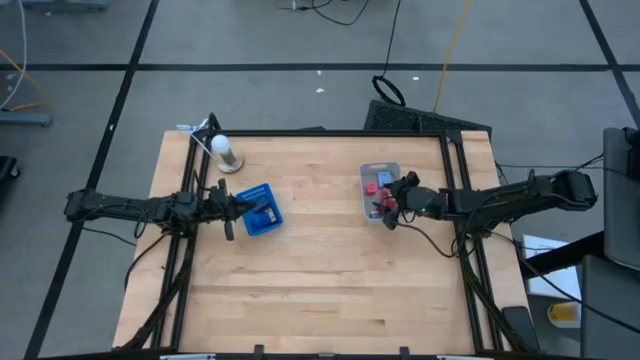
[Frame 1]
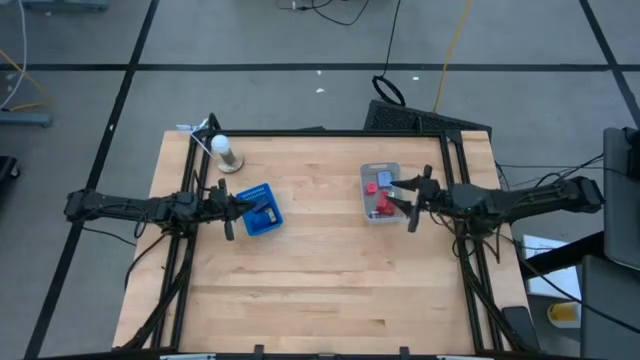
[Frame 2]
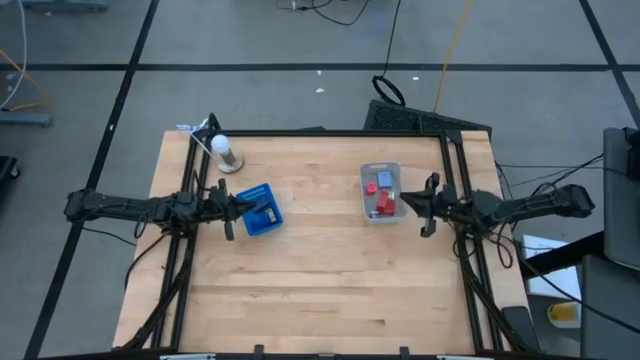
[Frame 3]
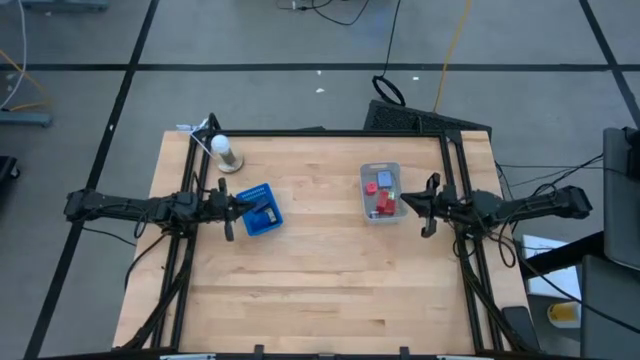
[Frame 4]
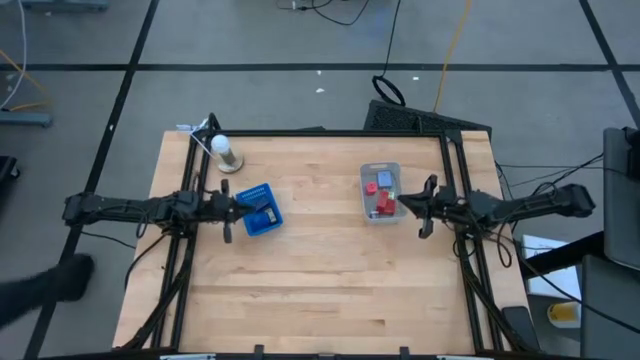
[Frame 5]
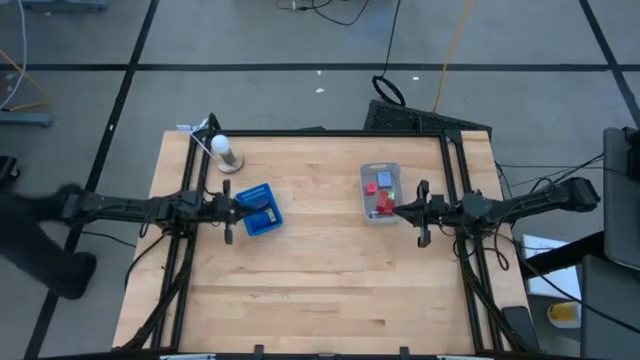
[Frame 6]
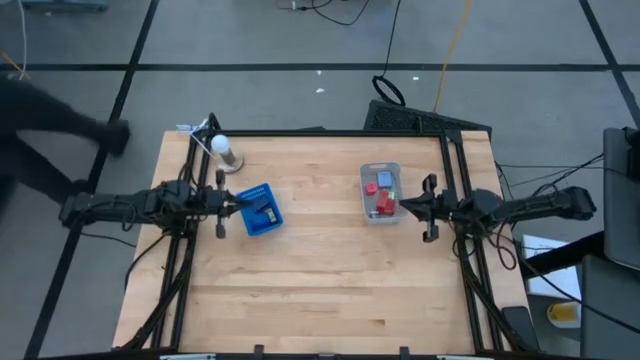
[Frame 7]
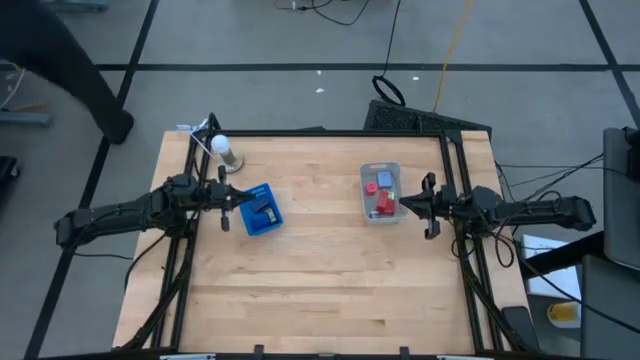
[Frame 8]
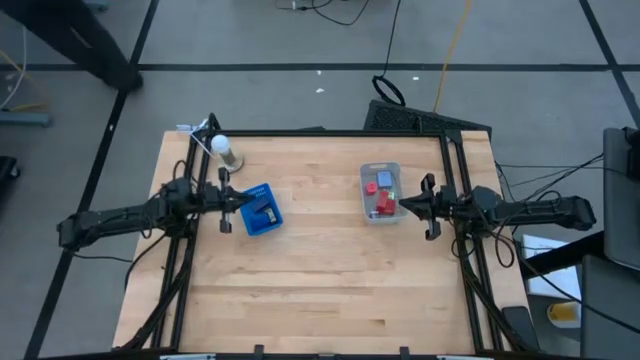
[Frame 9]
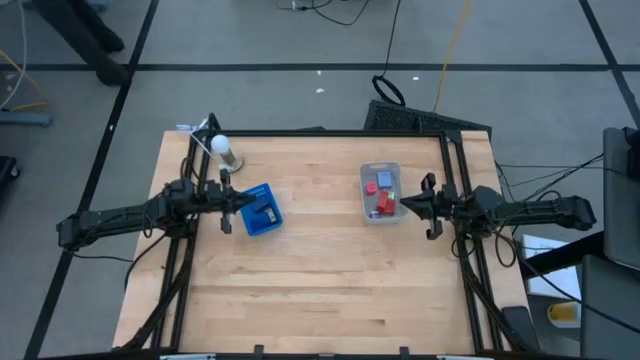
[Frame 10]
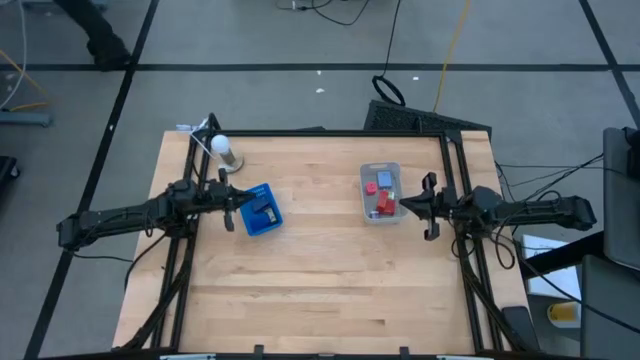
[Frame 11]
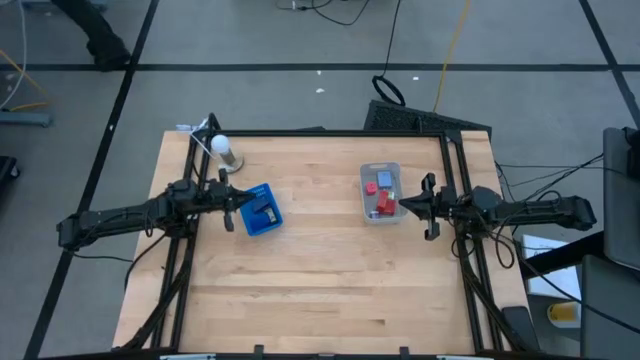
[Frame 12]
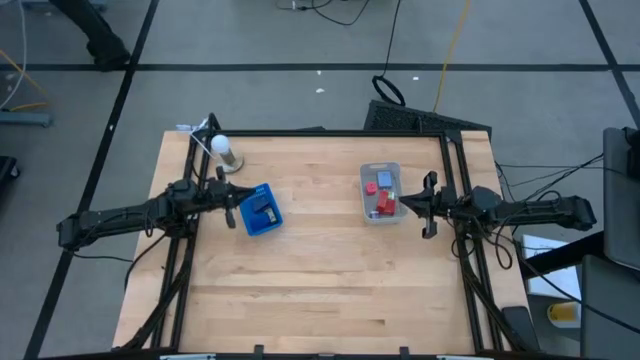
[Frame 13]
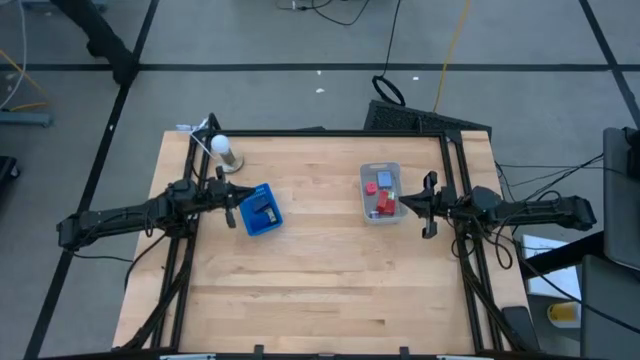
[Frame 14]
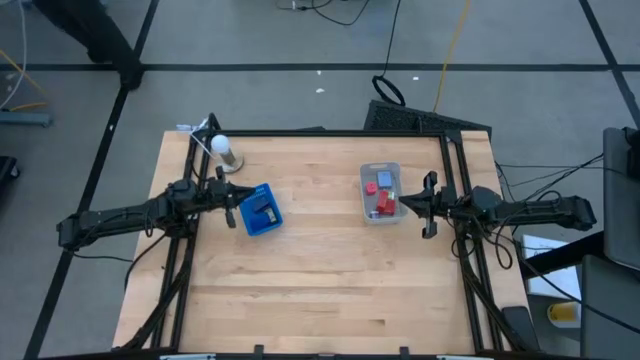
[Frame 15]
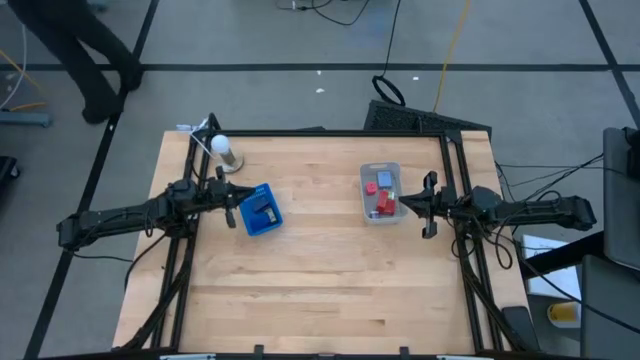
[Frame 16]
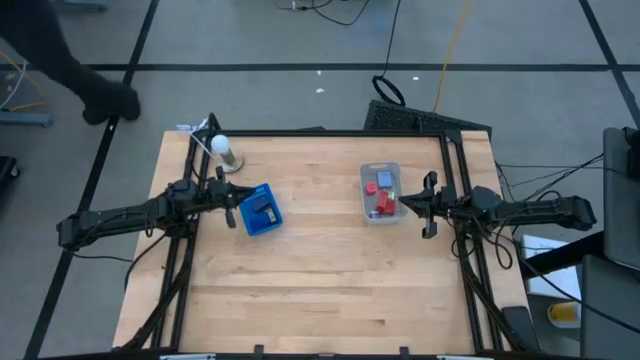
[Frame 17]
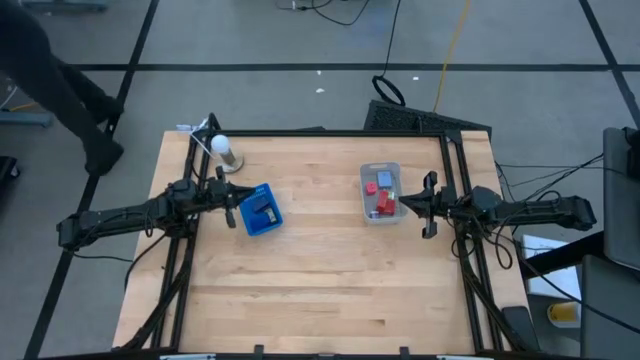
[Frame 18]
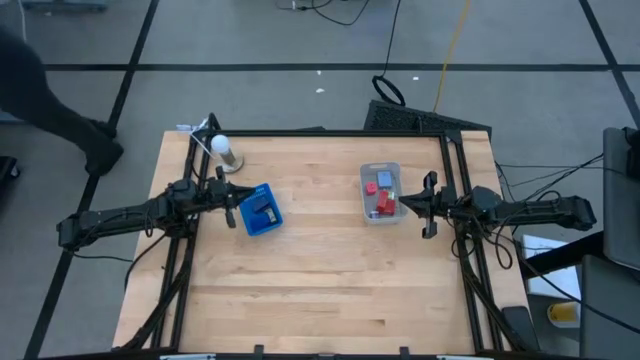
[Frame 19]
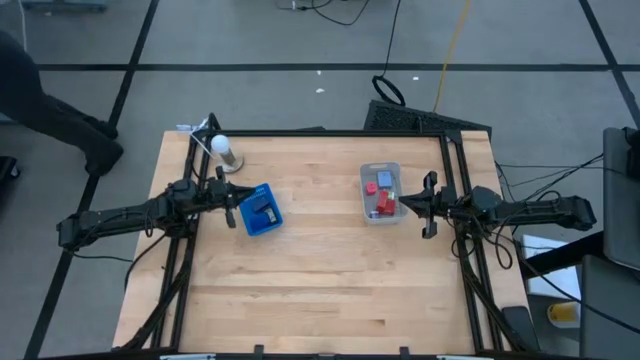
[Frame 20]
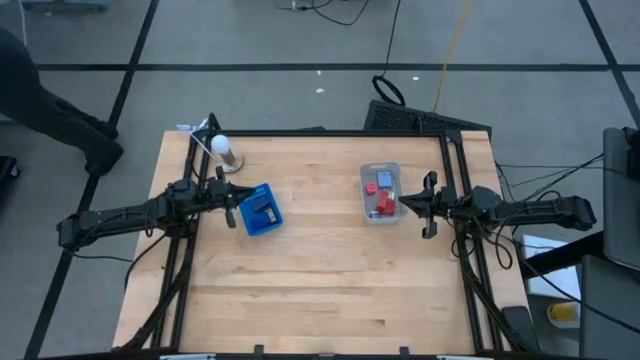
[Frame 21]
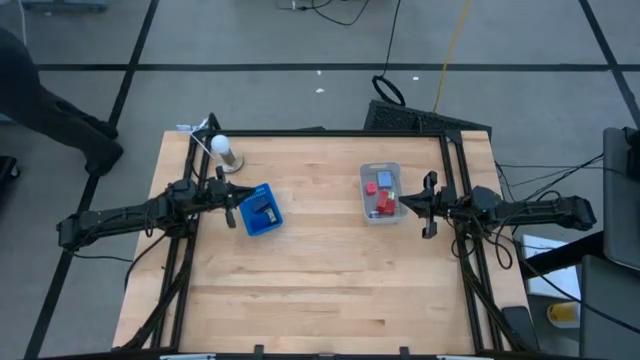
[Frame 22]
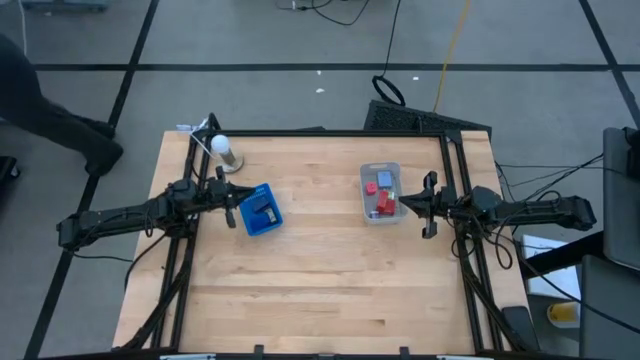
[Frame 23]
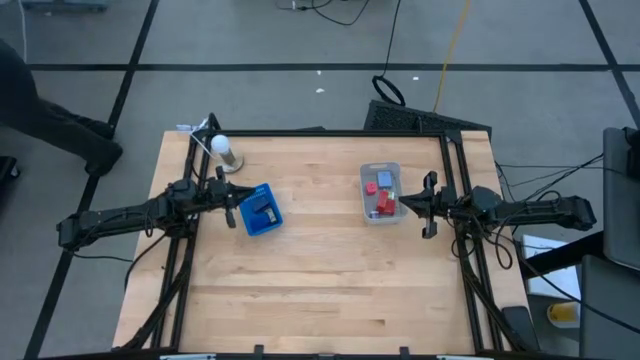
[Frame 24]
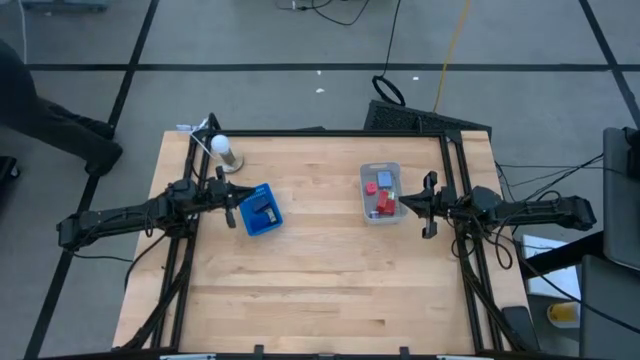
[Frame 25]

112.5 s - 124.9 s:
Task: Pick & Place Office items
Return to Home Position

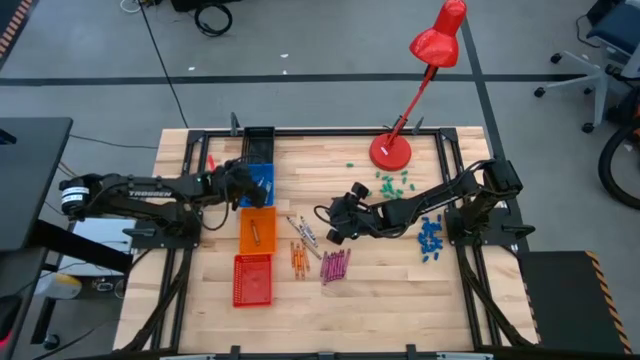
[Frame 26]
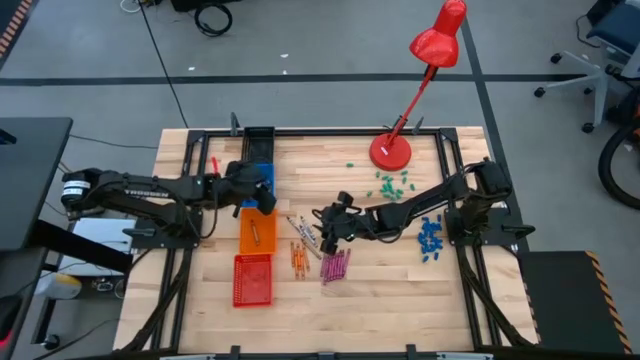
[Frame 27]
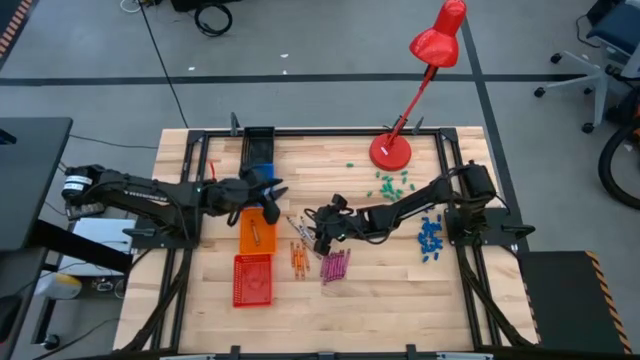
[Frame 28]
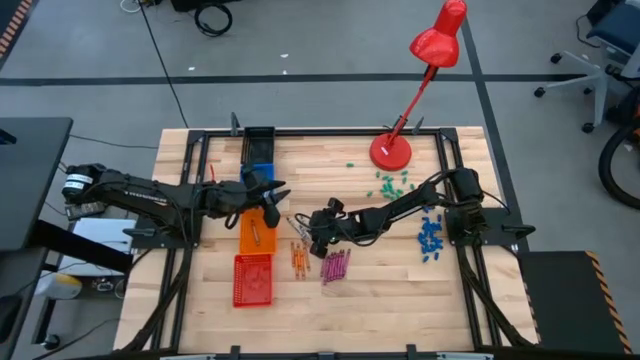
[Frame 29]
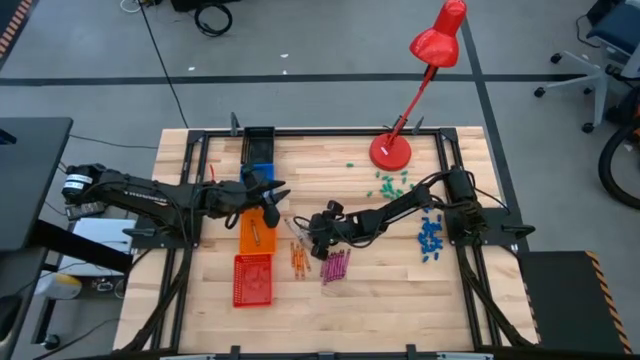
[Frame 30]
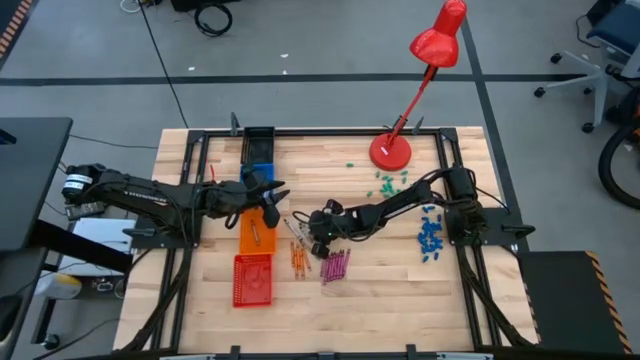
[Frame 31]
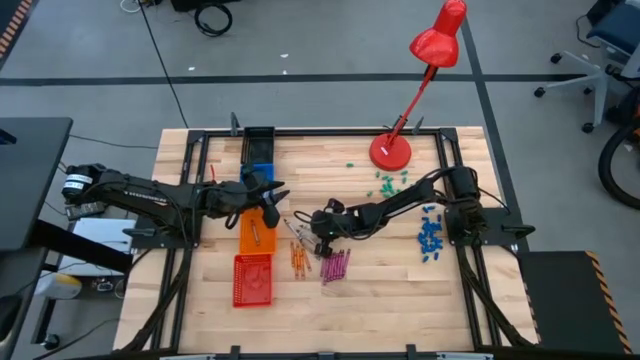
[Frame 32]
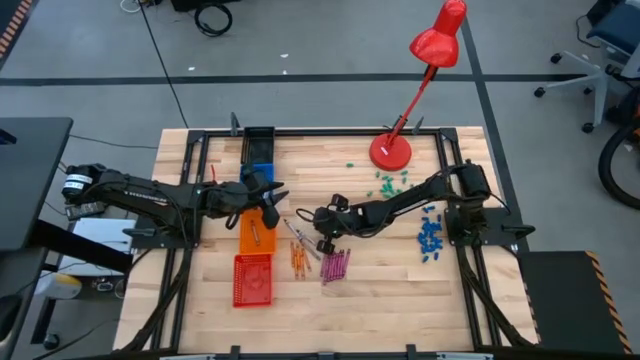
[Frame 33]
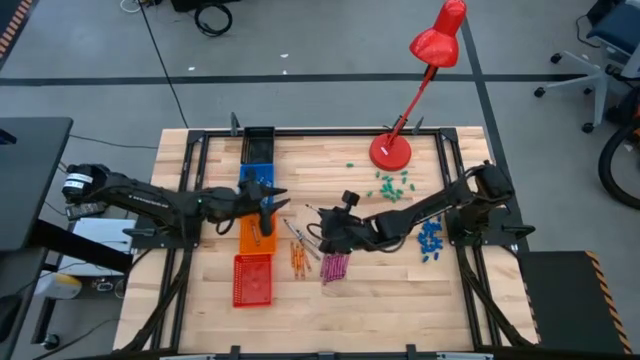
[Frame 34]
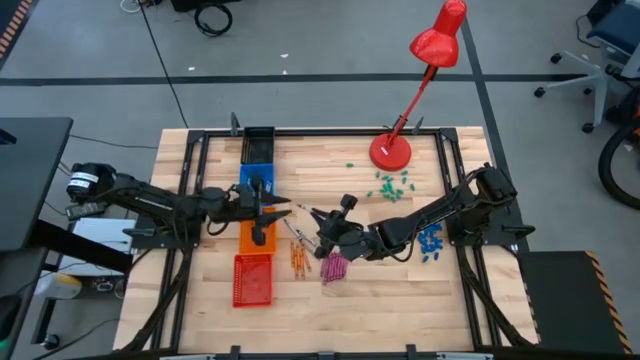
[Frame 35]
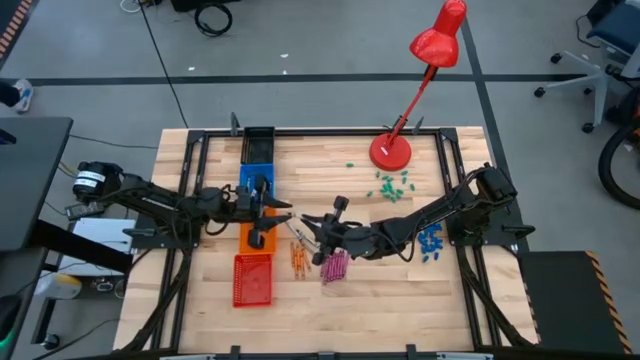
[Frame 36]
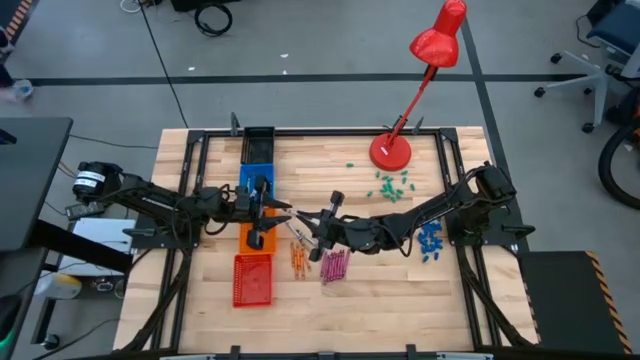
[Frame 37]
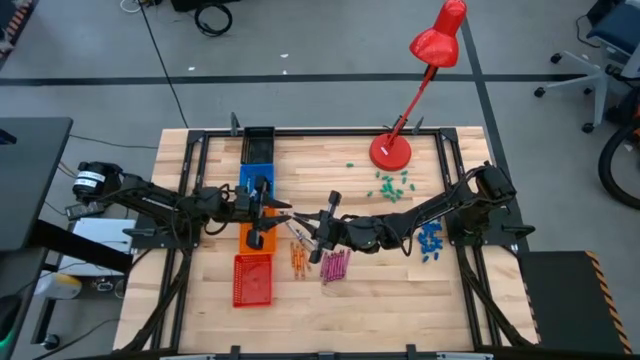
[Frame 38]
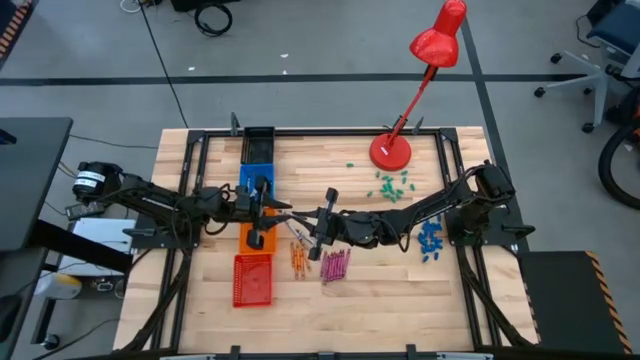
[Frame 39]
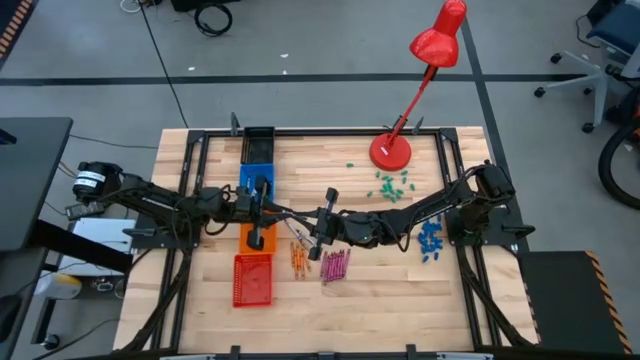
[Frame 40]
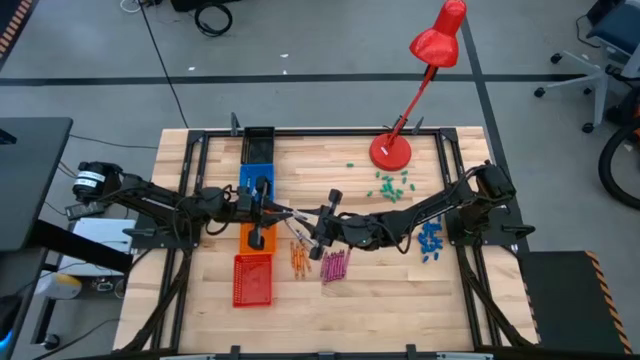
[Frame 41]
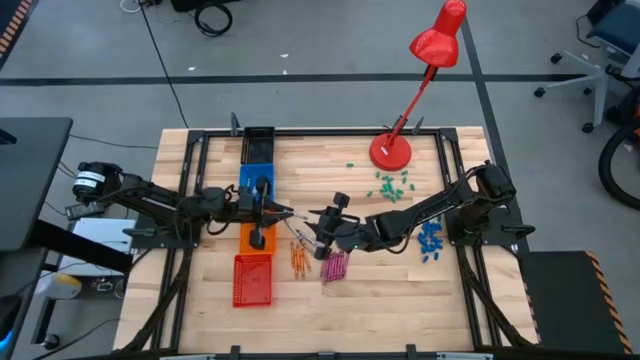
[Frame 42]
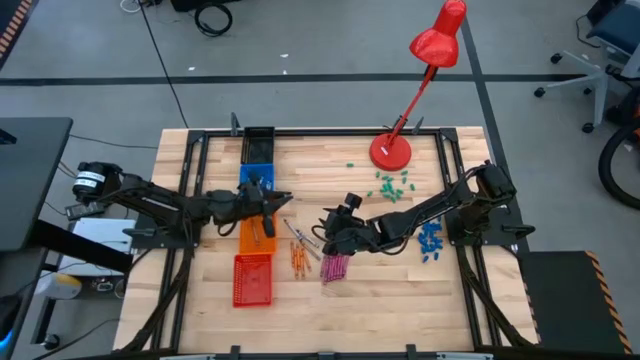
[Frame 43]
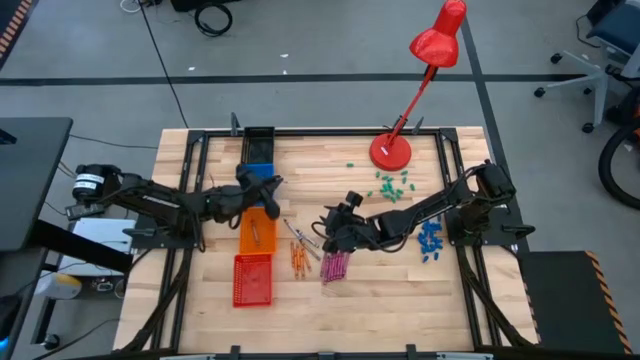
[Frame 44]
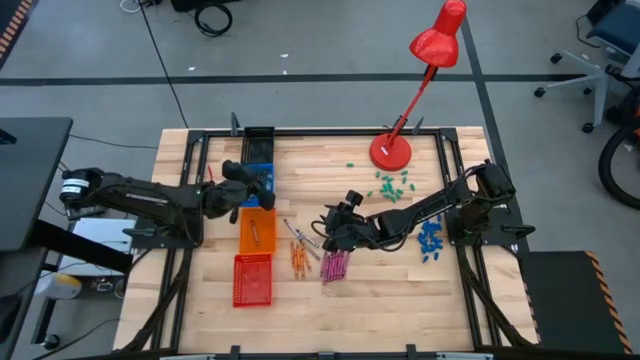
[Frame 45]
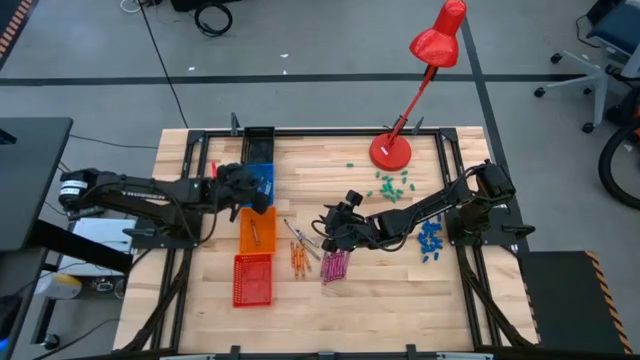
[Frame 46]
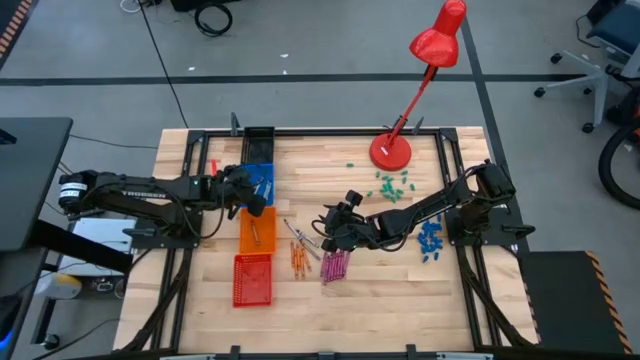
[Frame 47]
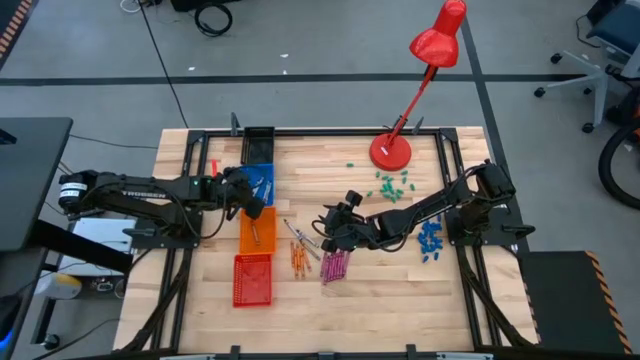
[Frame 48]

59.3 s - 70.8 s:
Task: Sort crayons
Put the black crayon into the blue bin
